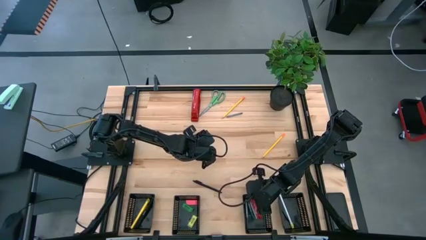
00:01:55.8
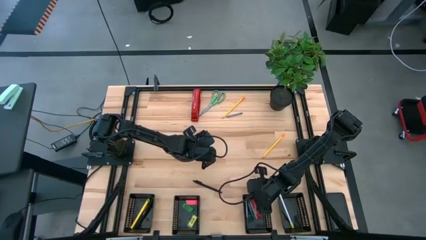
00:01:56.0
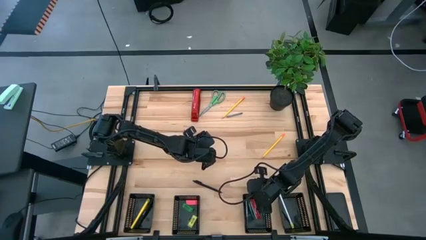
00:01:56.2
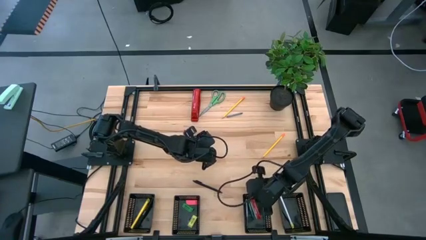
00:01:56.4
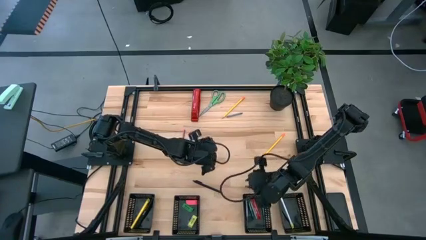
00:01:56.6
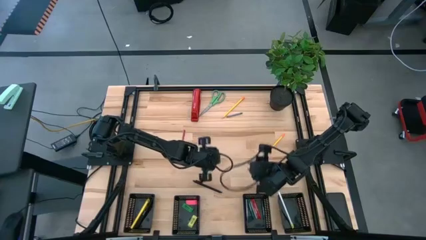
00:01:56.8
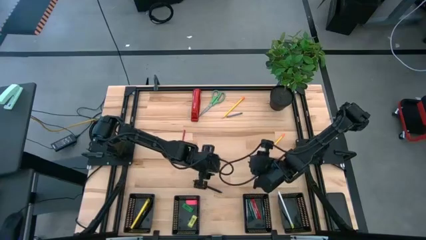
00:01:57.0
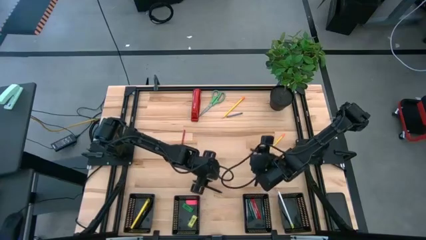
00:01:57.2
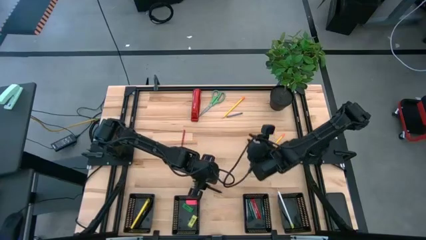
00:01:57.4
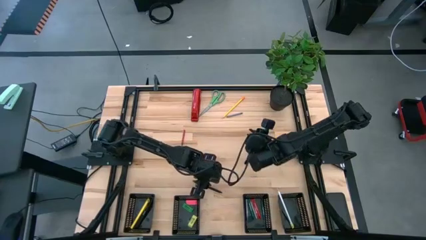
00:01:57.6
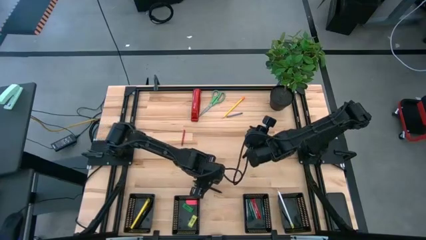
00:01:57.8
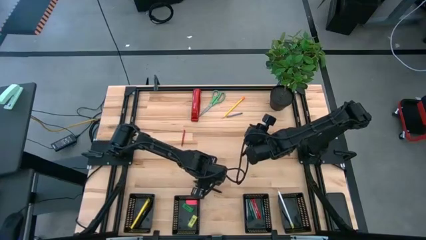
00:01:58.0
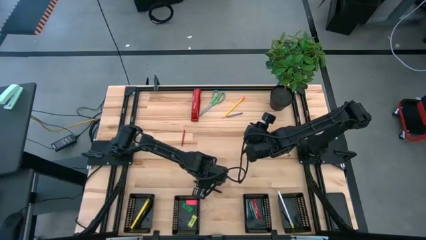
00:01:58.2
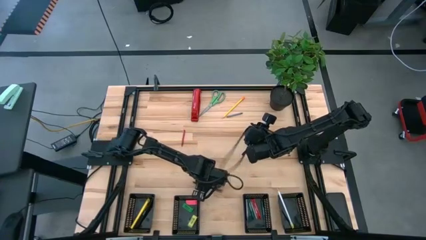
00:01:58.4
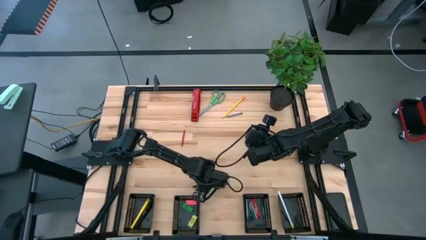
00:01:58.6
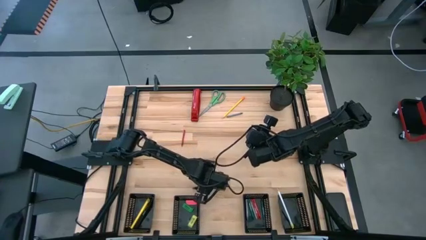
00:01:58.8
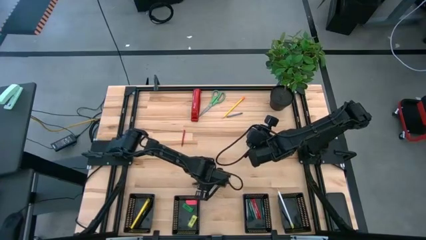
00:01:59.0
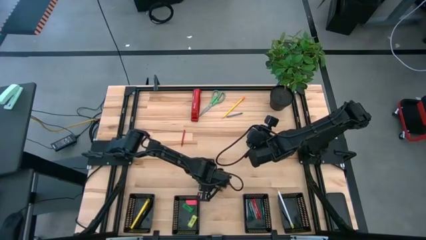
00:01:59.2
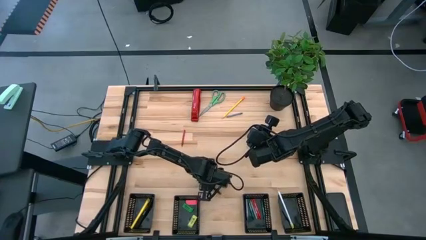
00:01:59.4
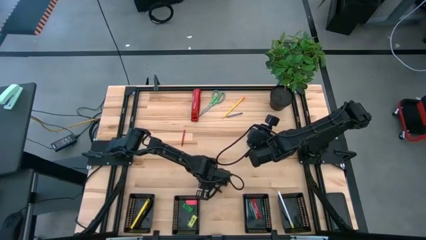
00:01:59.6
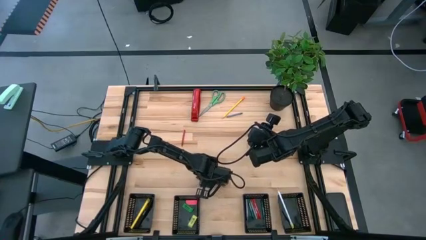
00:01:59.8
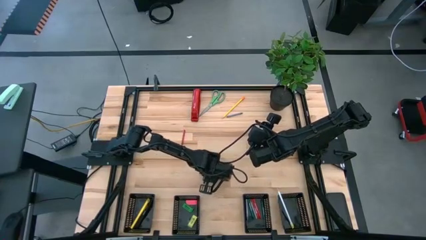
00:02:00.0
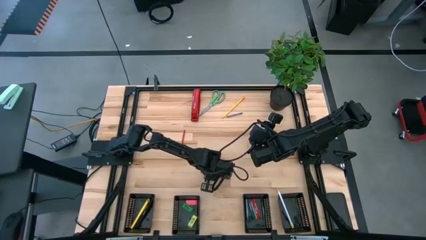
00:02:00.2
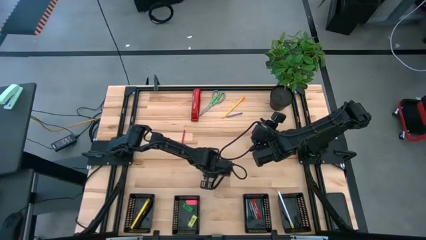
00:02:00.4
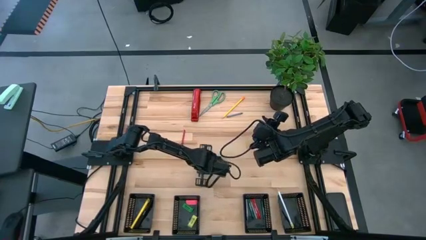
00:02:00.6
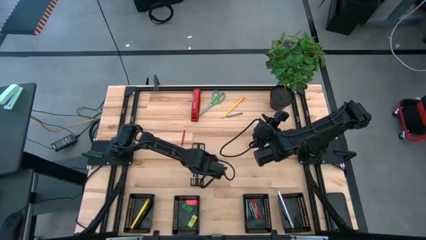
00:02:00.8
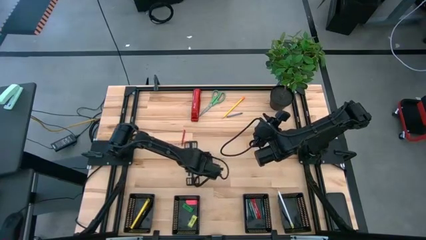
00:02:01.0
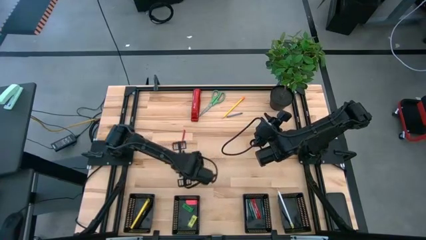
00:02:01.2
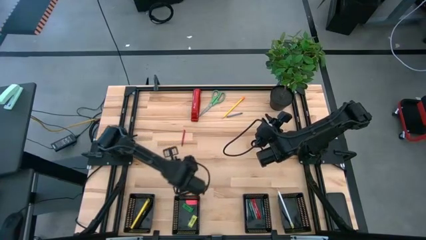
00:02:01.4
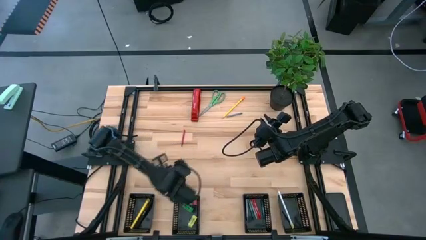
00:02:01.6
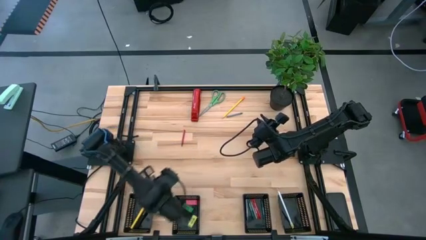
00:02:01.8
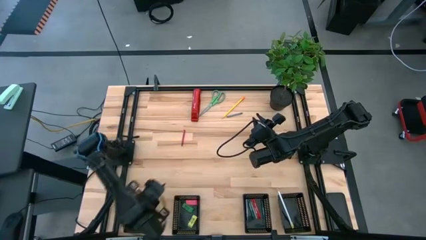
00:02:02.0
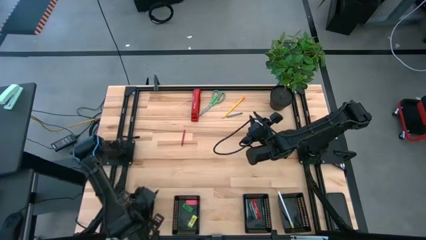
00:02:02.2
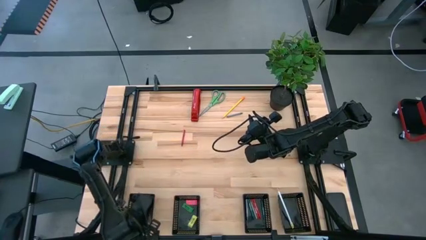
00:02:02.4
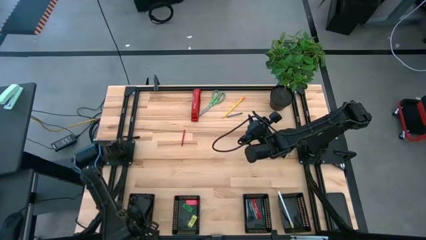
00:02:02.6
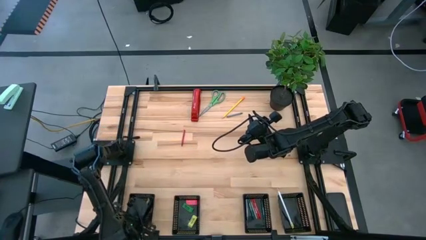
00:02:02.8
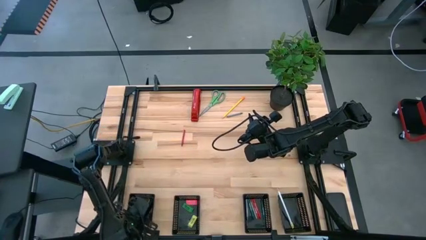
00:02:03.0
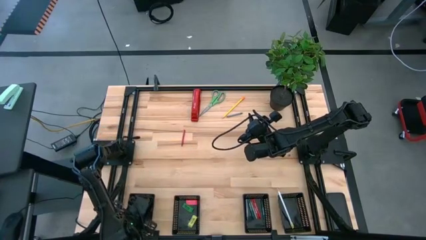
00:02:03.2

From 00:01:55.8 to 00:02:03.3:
Task: Sort crayons/erasers/pens/pencils in bins
Put the black pen into the left black bin

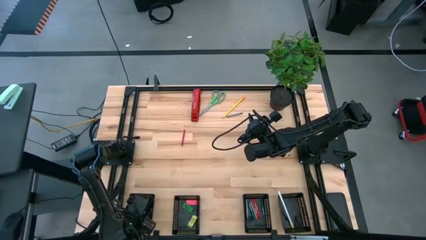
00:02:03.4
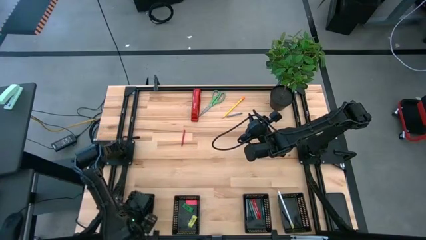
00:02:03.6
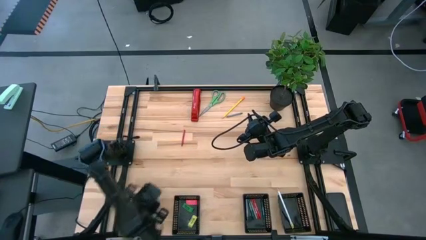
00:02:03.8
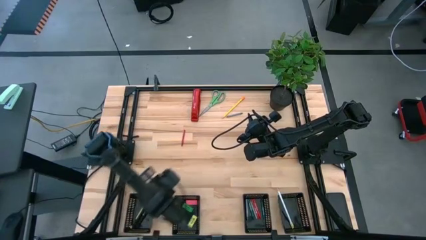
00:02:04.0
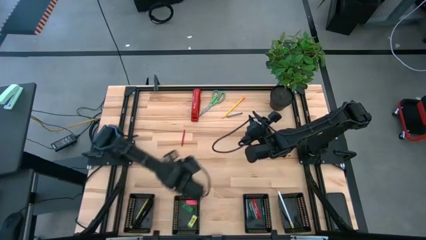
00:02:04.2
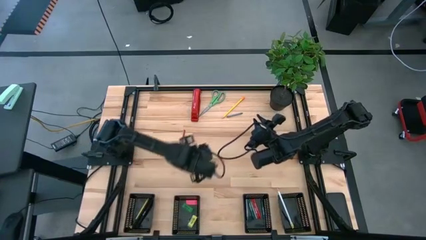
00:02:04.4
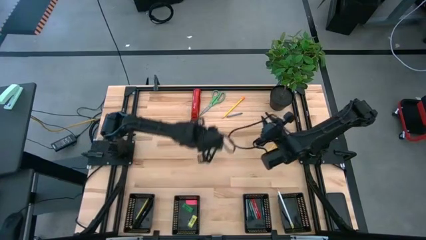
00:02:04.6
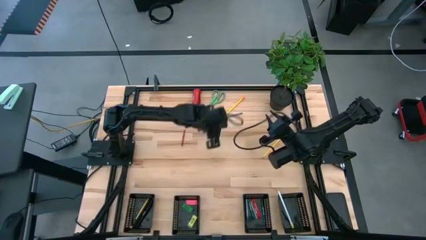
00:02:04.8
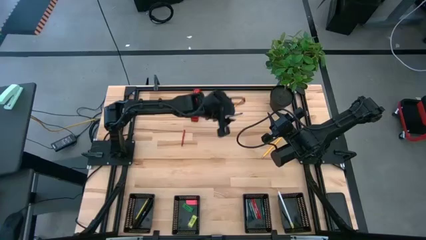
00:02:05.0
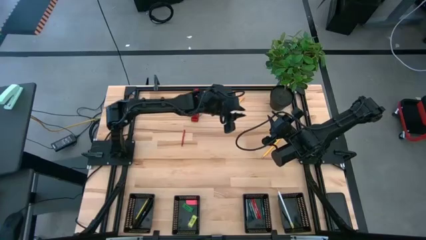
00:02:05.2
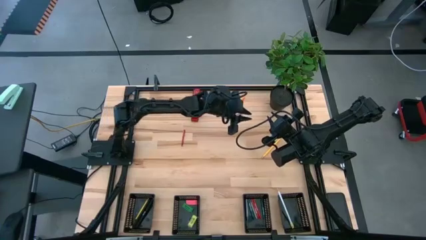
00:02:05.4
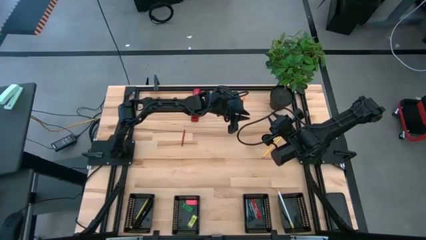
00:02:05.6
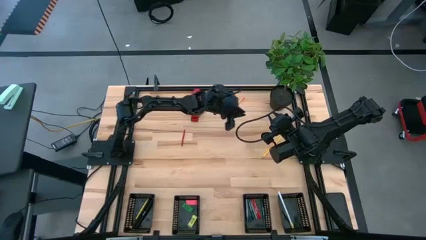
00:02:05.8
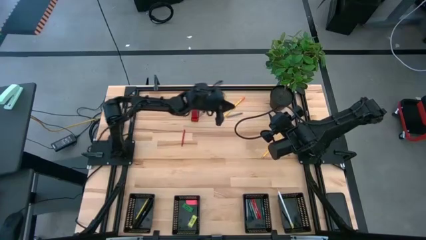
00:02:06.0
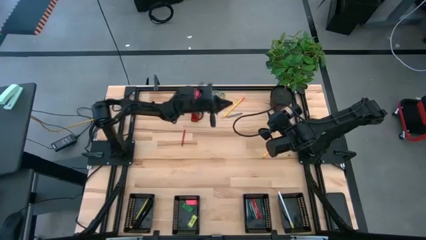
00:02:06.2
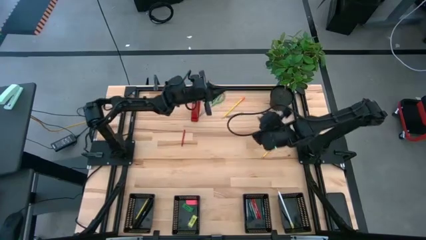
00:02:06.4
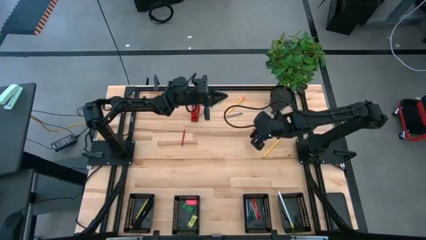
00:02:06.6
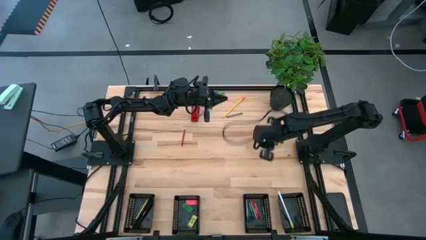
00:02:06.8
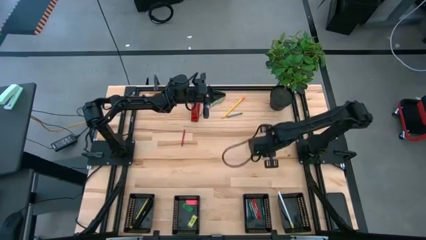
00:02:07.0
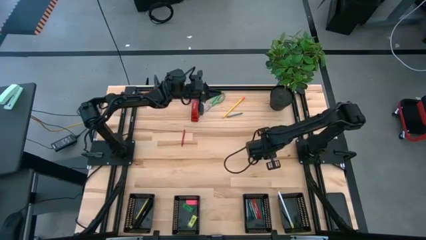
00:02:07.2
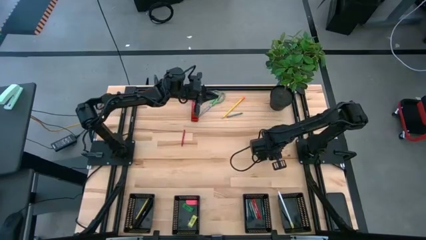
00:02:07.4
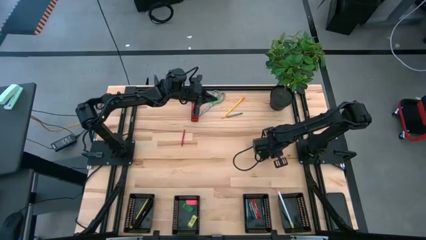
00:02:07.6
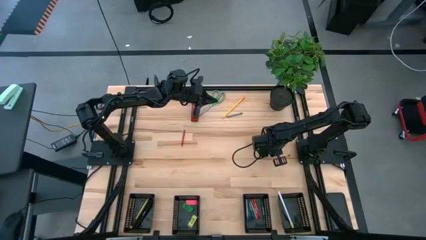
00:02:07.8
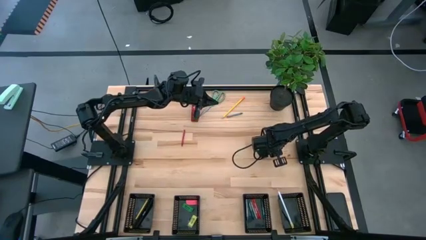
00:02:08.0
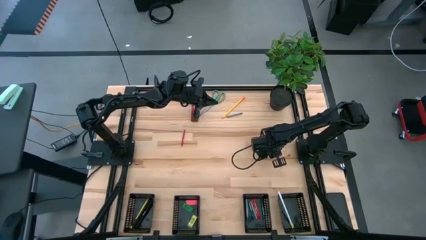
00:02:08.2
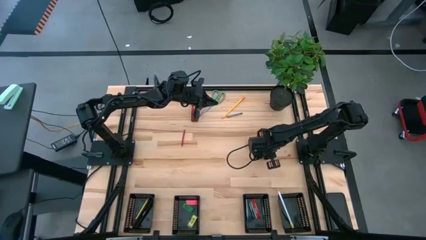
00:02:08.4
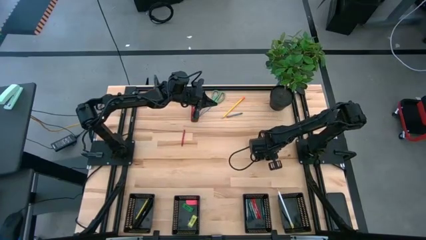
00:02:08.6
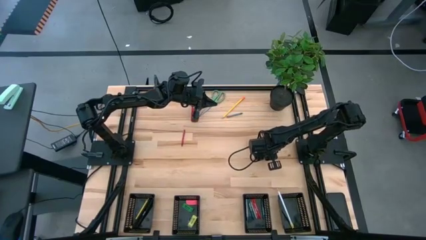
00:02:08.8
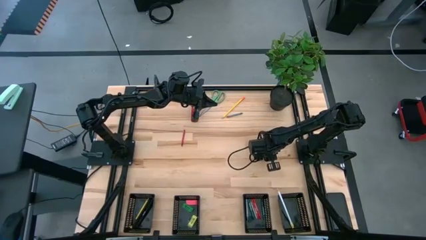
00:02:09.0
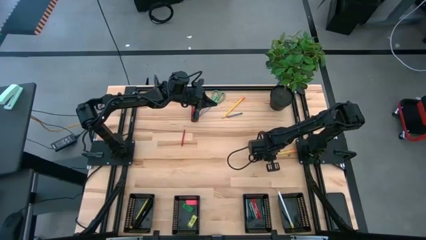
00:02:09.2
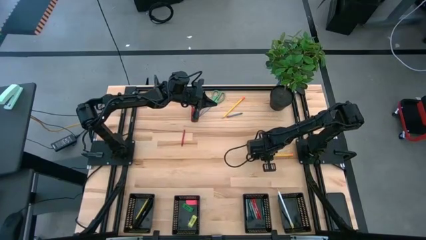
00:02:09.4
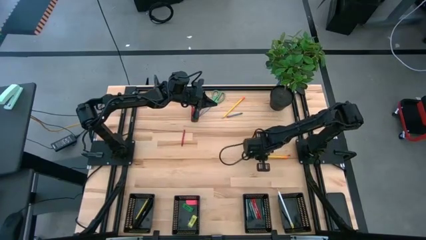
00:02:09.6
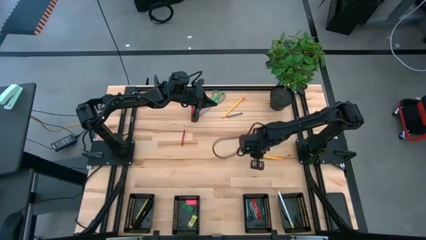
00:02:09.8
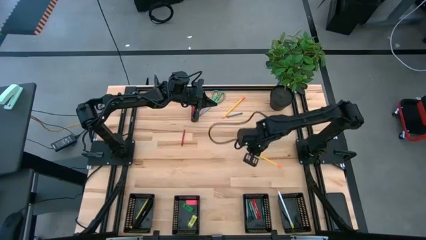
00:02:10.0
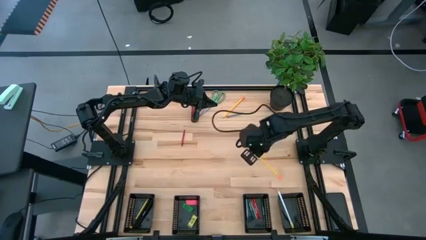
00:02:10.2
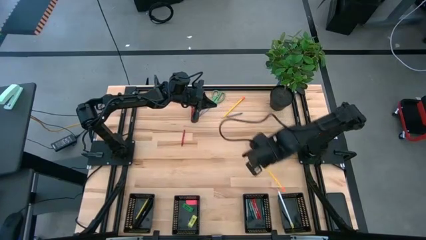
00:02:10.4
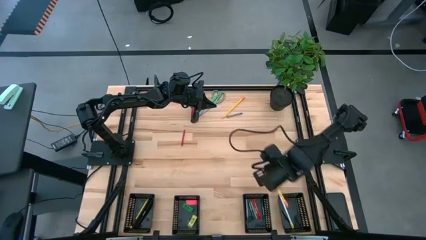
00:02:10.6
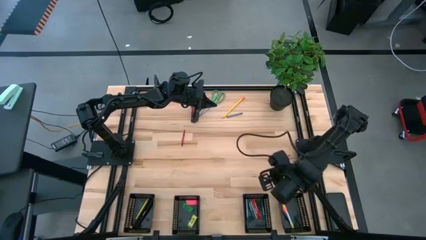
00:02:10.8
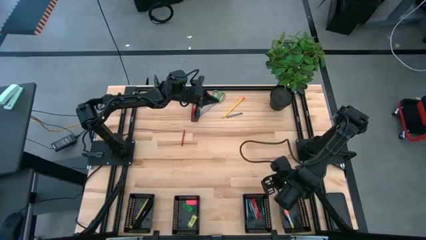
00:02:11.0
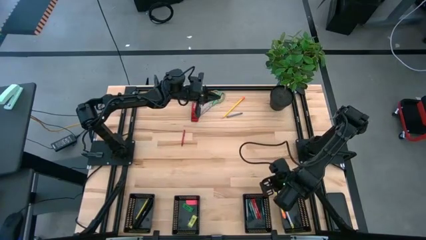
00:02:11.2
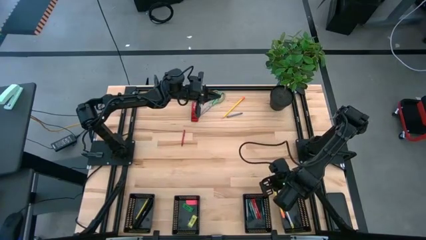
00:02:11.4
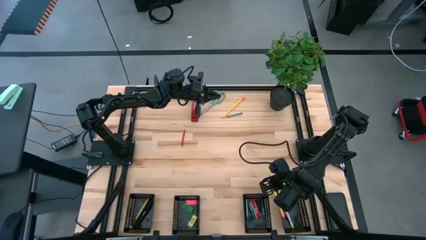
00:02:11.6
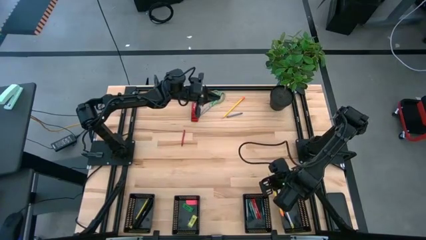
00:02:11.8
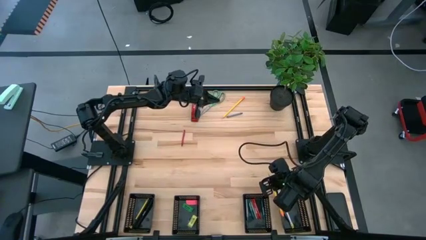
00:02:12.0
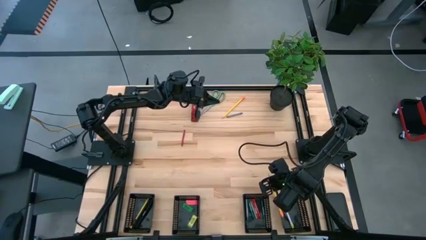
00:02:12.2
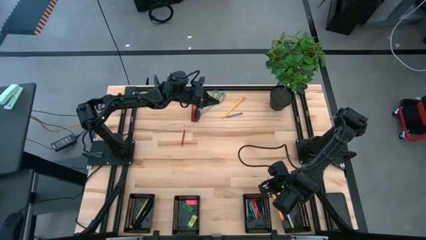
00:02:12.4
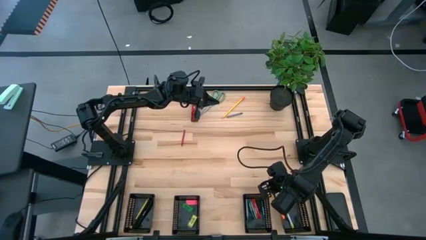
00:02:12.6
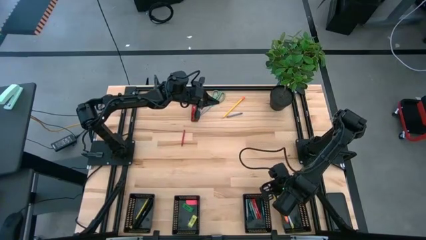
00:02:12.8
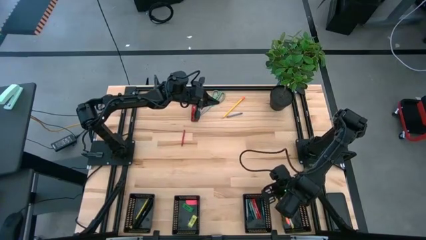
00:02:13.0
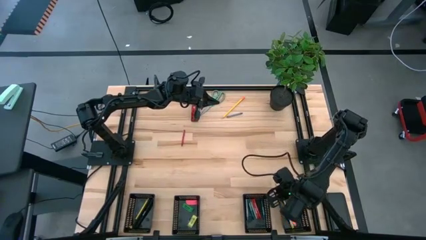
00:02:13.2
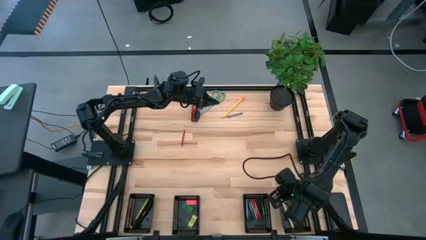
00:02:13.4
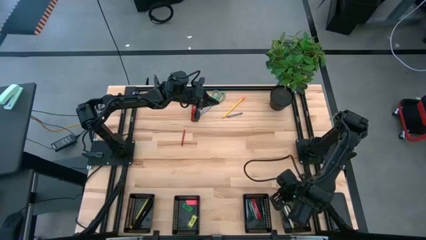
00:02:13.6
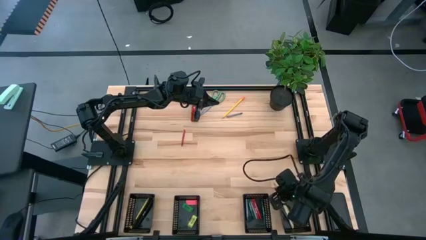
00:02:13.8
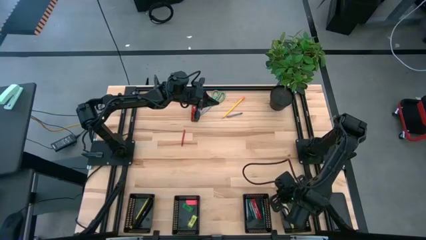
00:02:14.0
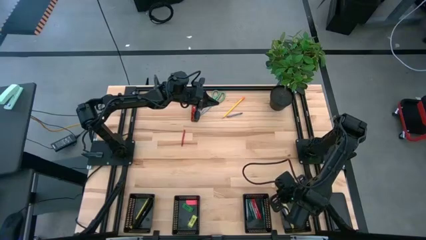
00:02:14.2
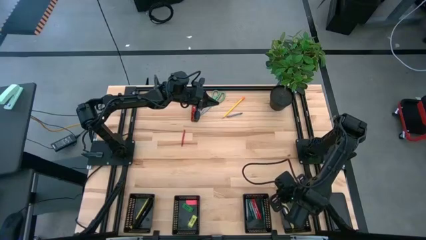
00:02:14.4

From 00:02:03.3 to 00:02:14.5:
Put the bottom yellow pencil into the right black bin
